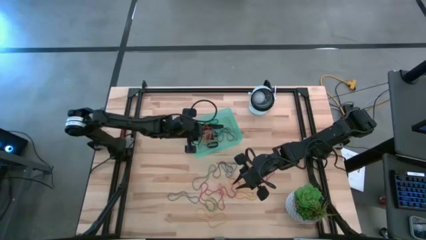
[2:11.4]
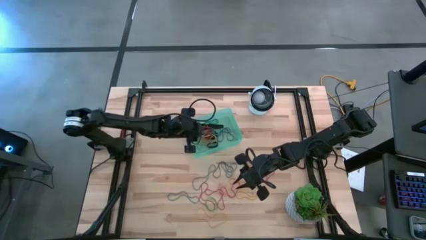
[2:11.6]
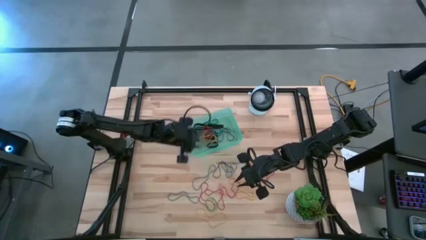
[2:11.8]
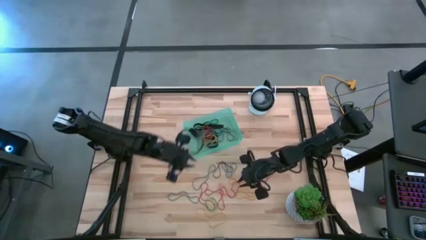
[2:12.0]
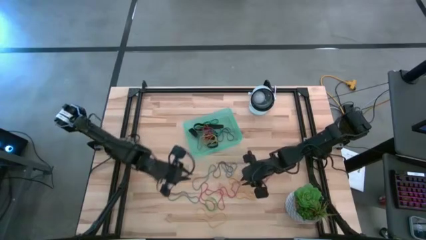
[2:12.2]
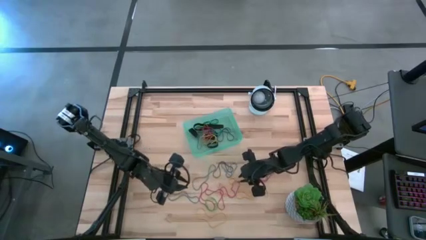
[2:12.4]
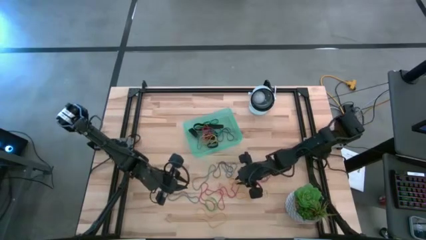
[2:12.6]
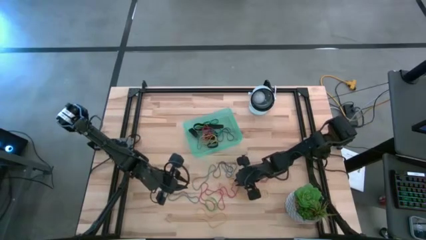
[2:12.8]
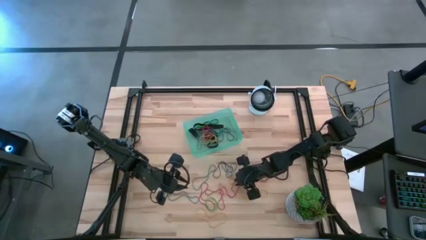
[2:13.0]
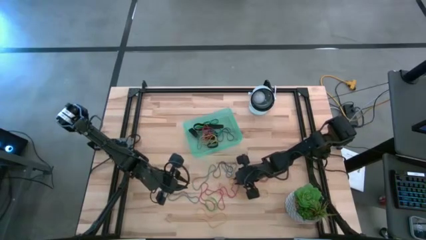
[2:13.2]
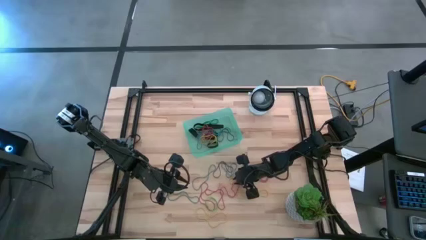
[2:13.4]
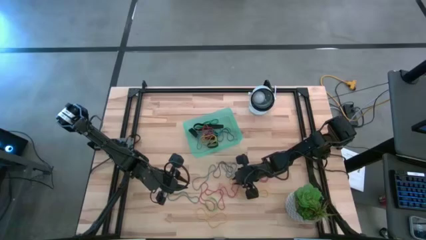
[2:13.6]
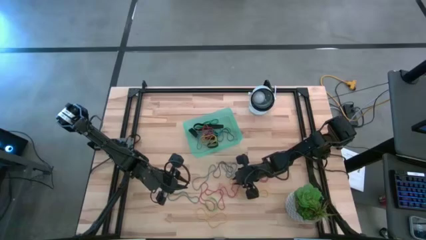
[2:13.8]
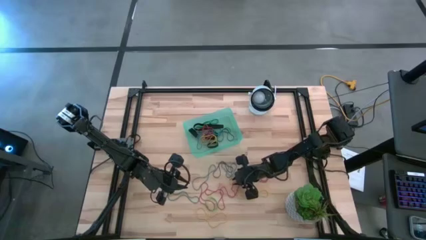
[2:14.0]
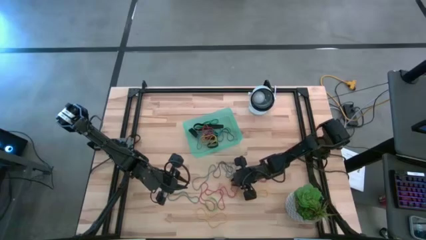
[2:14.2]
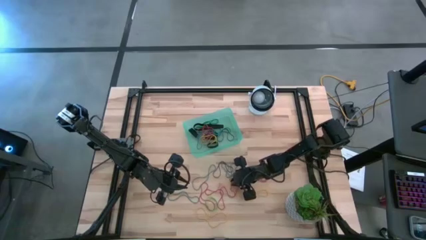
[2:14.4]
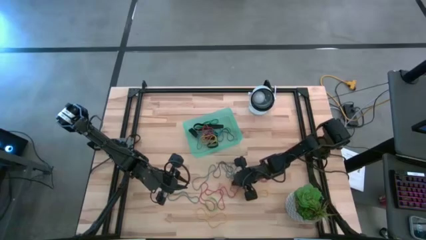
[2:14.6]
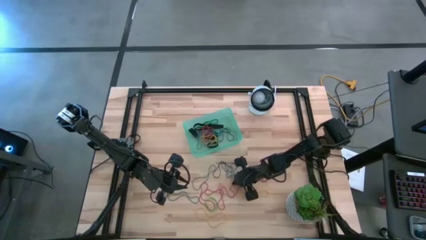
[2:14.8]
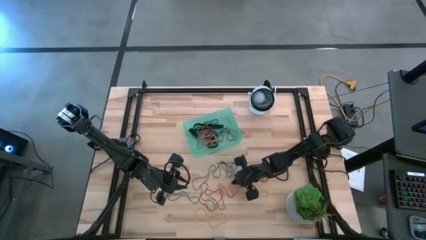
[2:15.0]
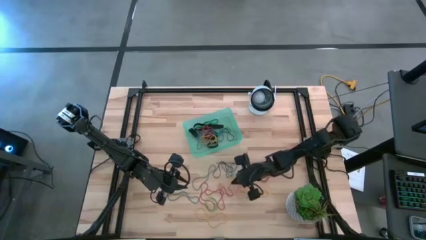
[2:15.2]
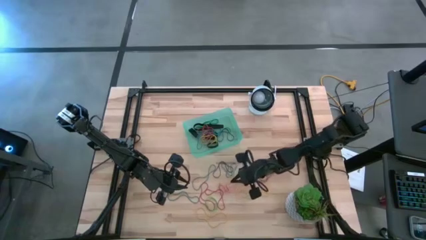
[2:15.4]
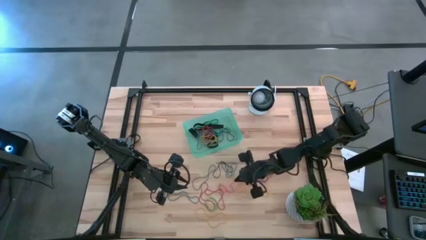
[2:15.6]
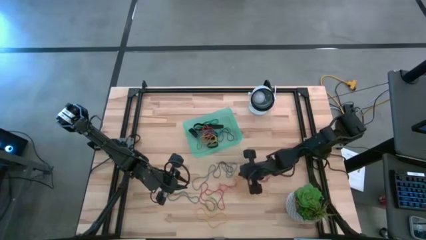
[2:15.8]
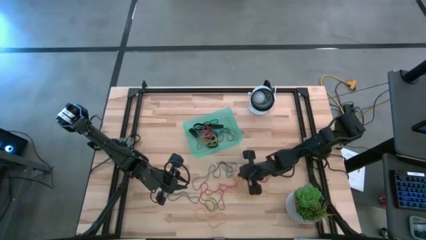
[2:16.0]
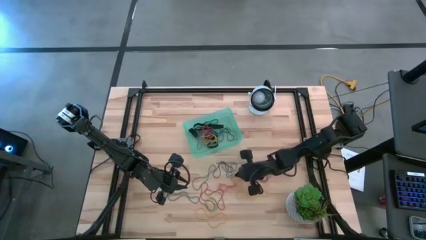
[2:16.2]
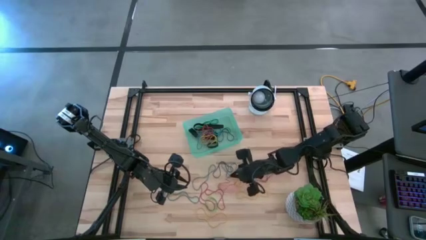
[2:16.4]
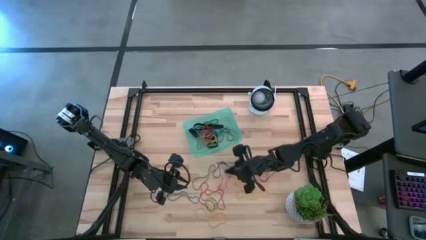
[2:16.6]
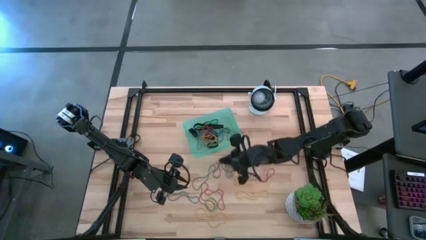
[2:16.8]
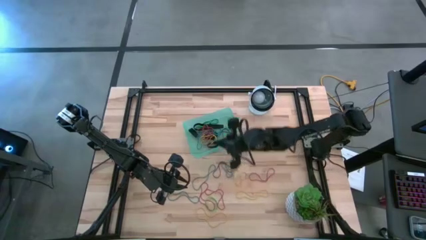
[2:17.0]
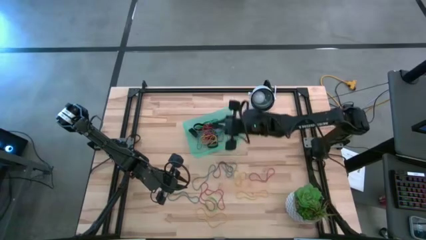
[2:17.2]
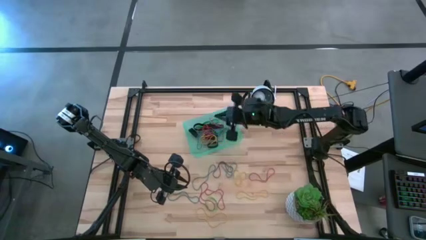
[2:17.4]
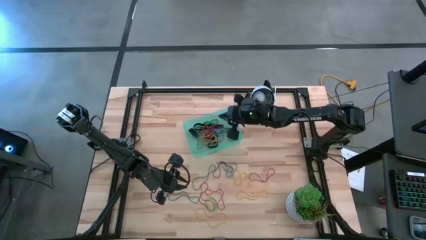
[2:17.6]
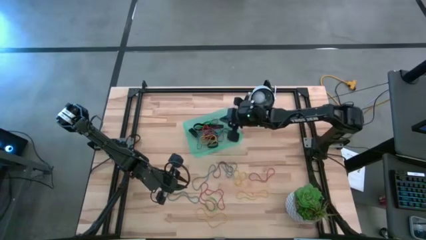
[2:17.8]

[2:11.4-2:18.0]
Task: Pick and place rubber bands into bin
Put the red rubber band into the green bin

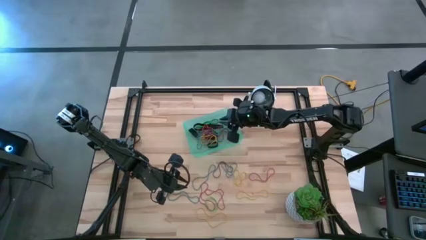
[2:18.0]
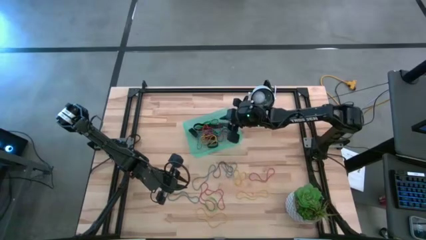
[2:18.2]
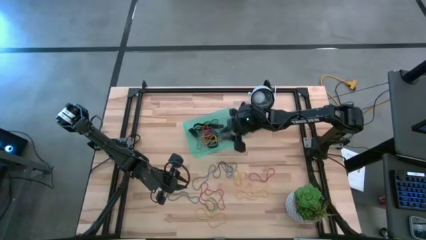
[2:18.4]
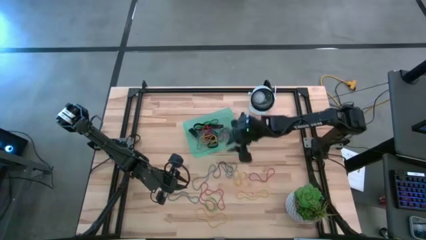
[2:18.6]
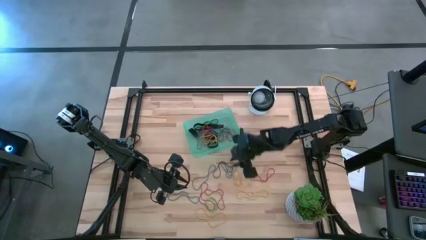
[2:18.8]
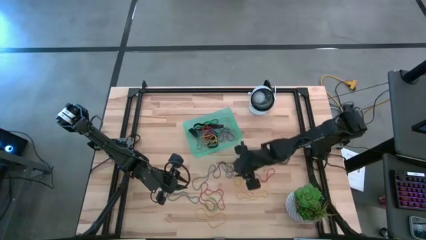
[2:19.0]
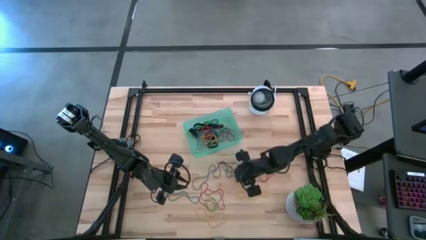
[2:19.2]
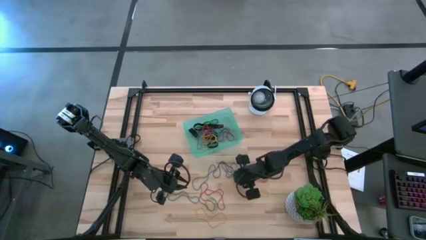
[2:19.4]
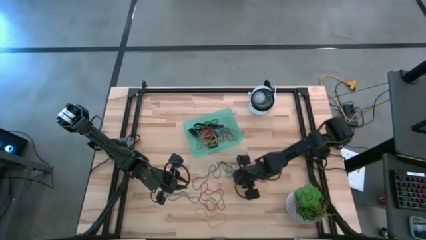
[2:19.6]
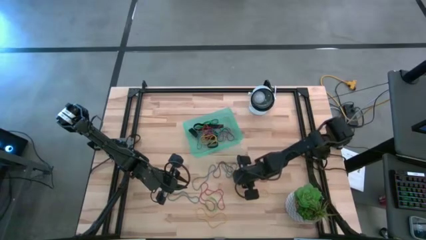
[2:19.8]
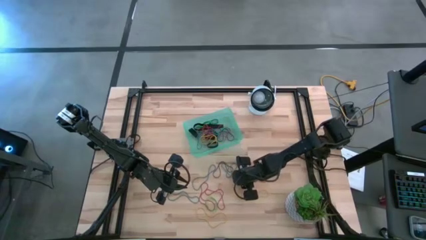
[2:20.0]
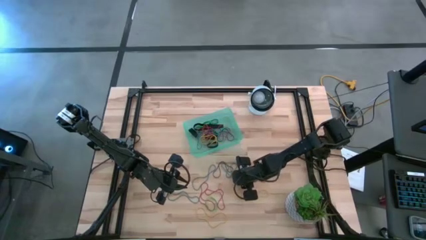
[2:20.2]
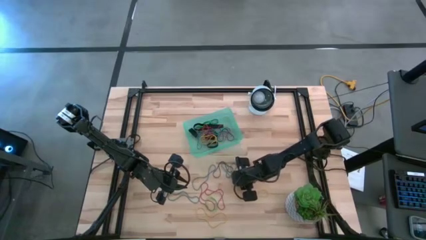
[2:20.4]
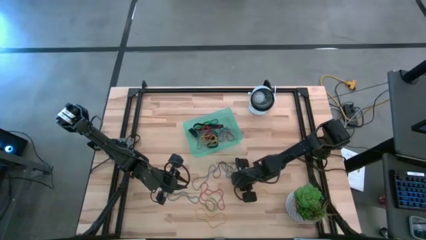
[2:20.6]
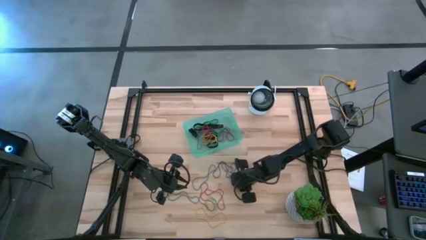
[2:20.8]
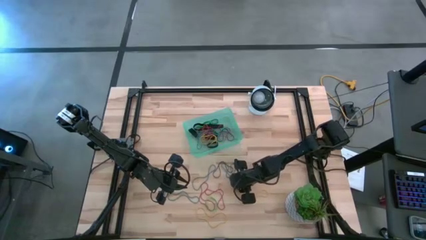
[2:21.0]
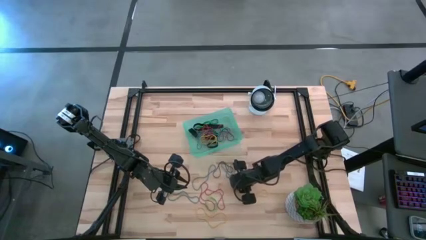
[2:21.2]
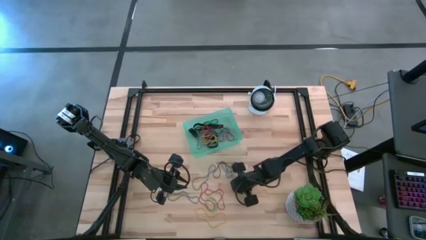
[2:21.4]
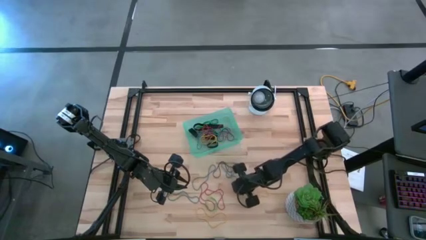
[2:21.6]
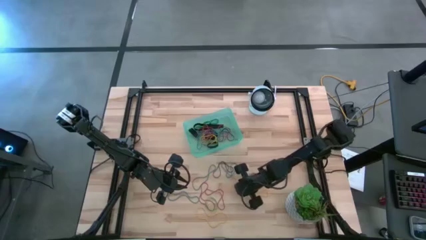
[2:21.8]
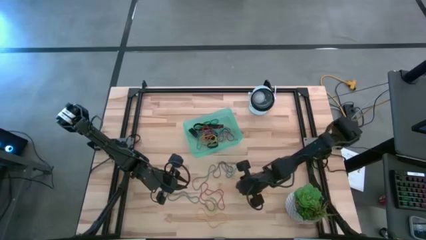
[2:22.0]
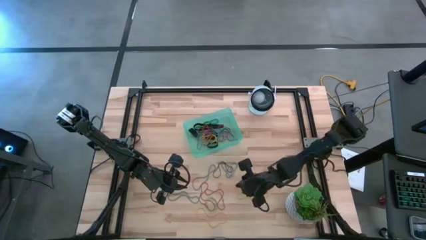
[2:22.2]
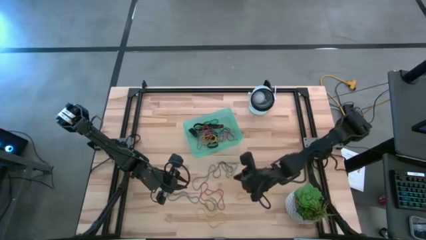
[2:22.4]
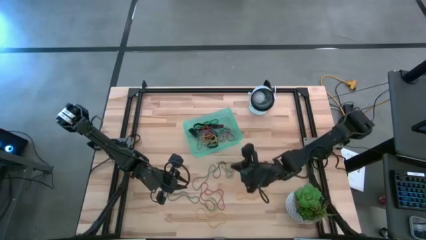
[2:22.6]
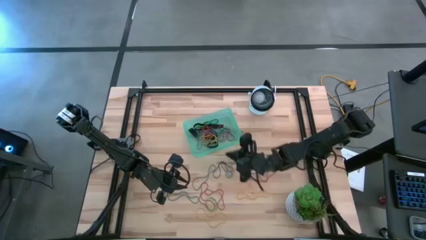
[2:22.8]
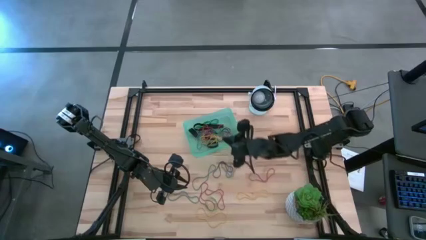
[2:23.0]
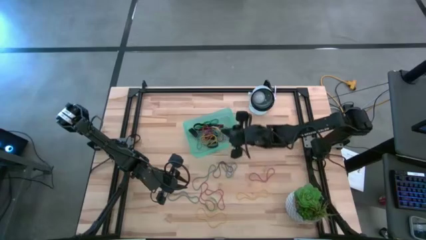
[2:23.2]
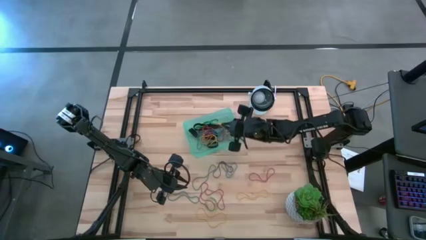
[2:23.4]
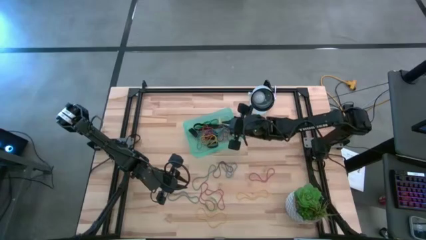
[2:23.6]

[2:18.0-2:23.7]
Put the yellow rubber band into the green bin

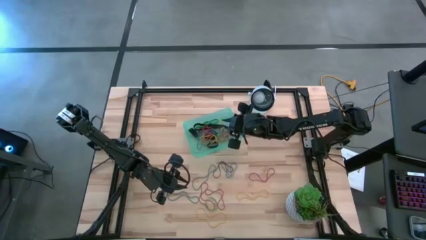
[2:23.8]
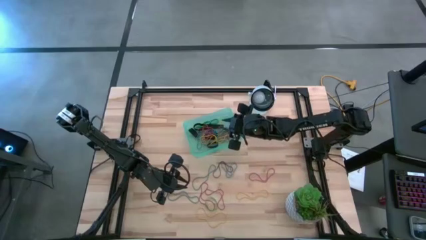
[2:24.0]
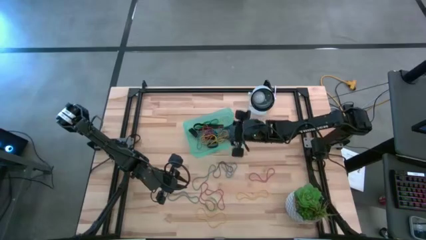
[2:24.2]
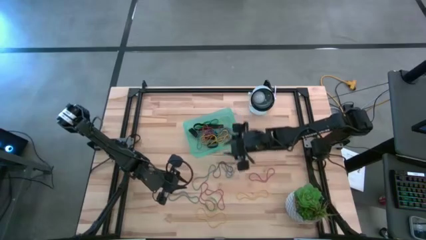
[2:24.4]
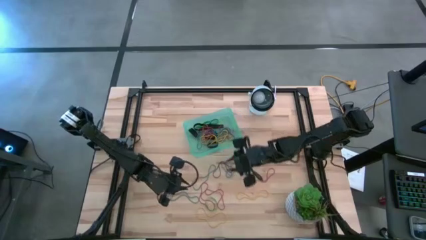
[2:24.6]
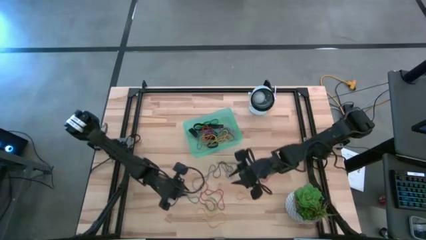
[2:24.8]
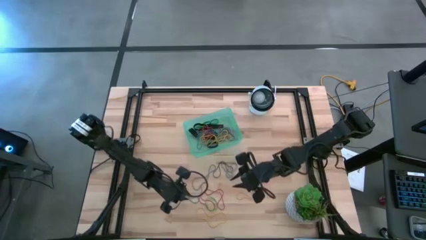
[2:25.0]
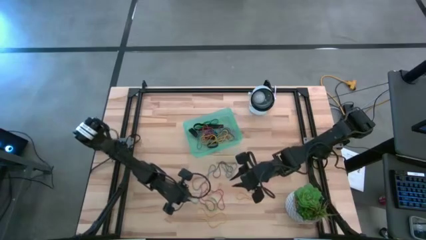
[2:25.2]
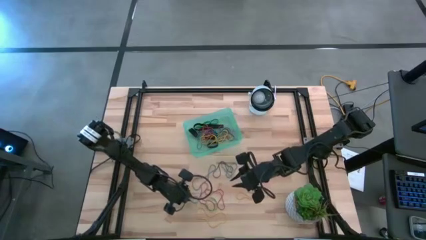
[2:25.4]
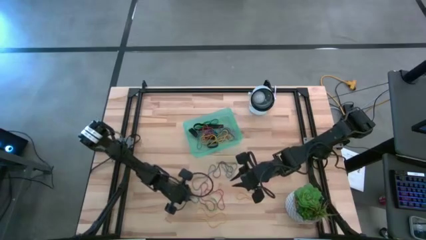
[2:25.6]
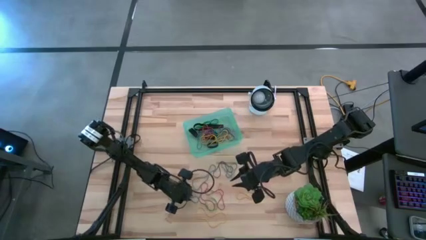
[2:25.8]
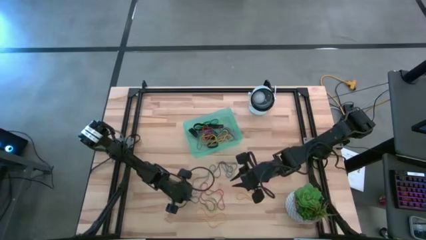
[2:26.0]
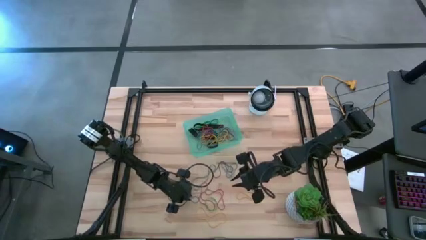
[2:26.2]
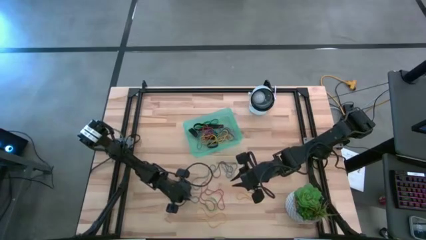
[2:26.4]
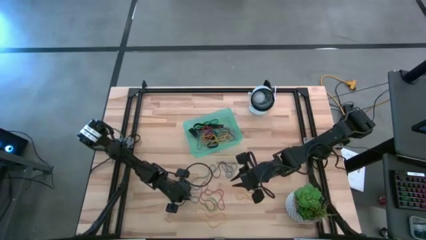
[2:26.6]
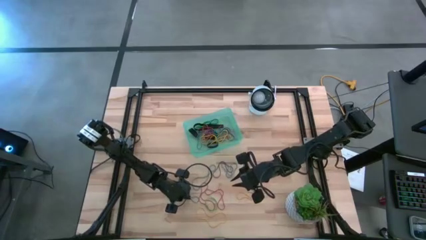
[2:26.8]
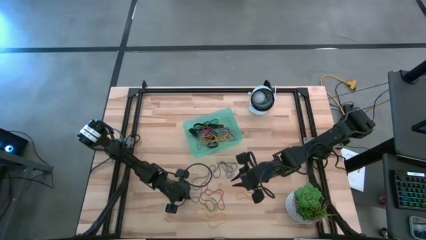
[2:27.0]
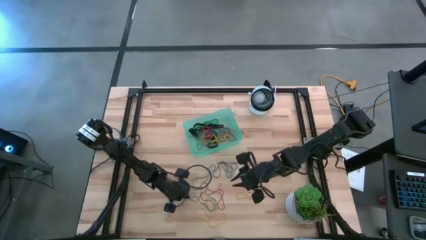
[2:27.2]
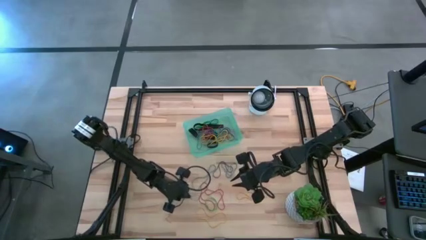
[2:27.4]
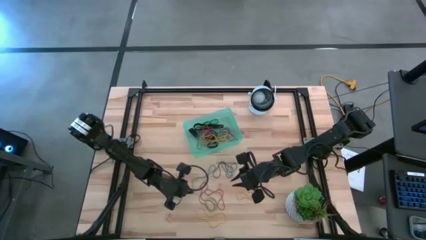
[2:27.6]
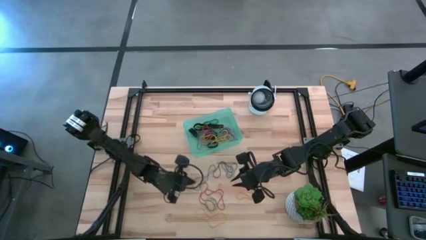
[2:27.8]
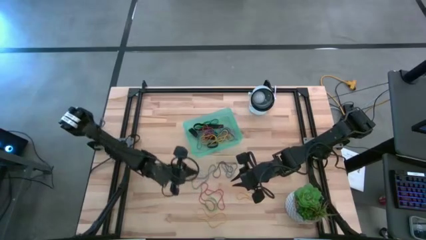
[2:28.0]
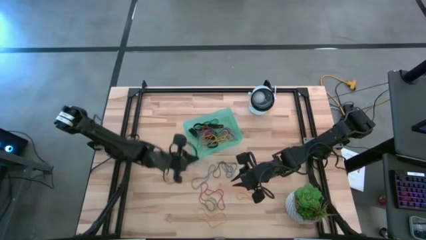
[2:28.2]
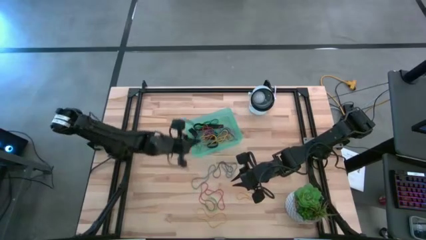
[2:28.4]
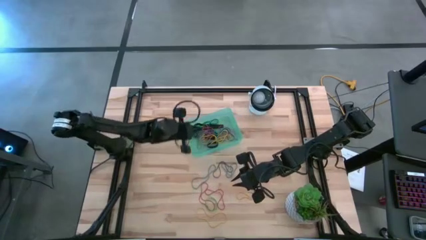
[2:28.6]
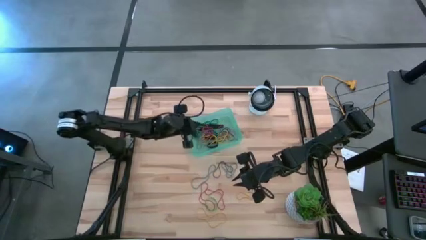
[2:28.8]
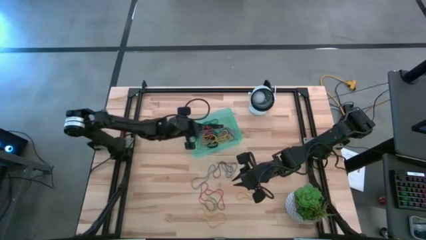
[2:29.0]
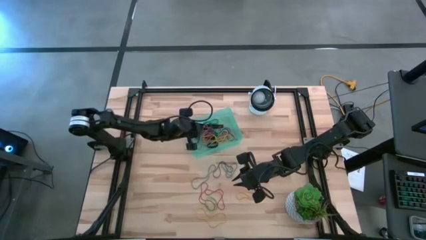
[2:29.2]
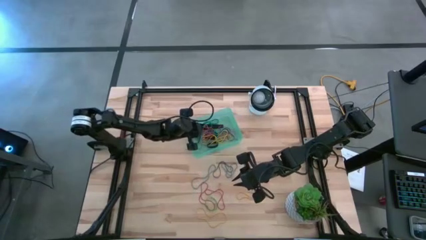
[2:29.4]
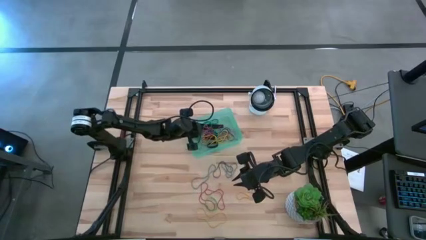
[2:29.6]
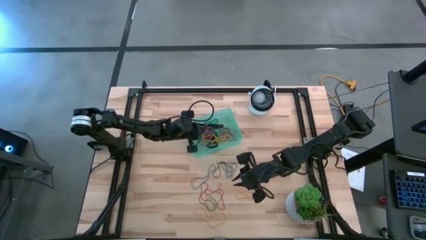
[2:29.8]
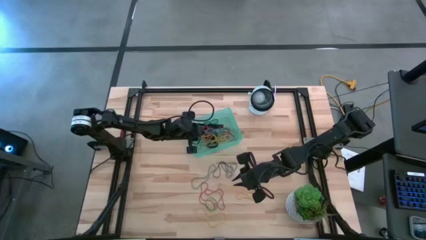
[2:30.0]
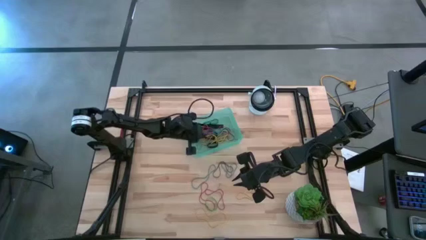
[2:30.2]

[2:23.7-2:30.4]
Put the blue rubber band into the green bin
